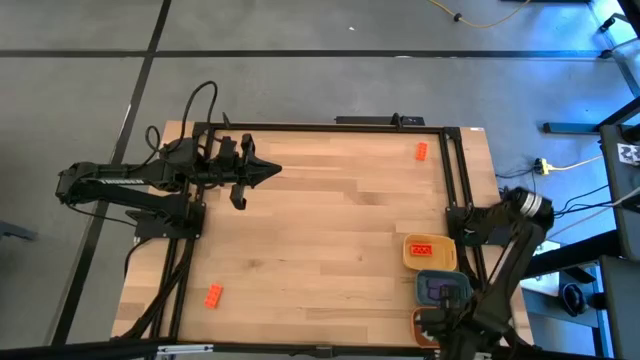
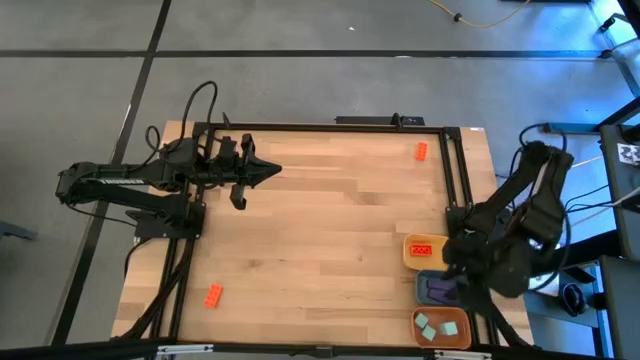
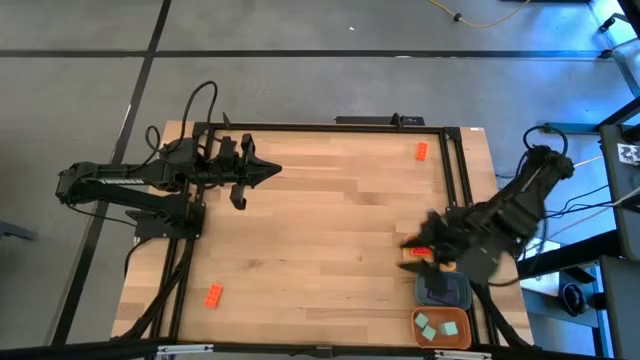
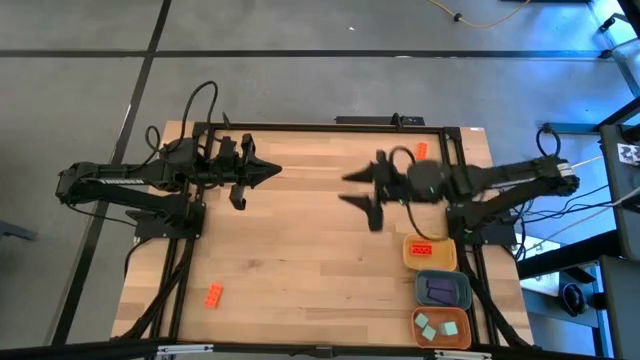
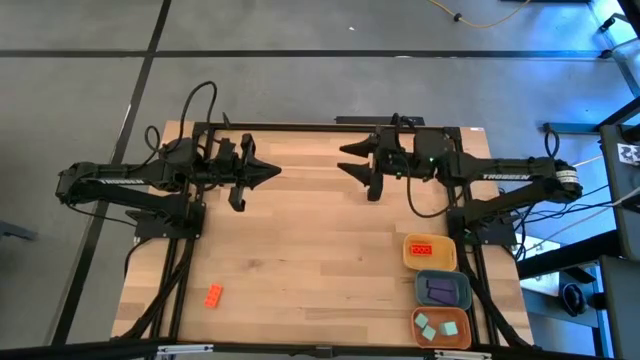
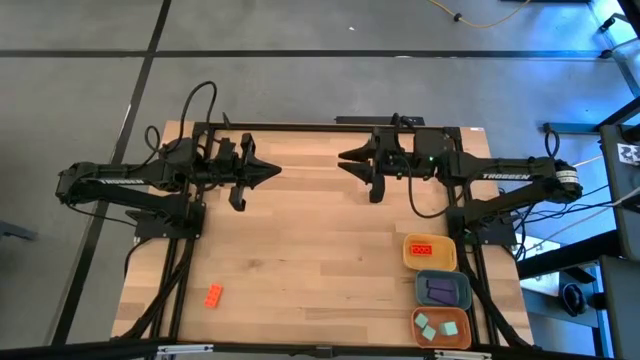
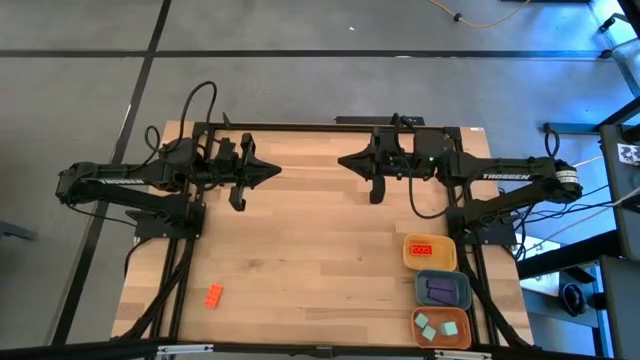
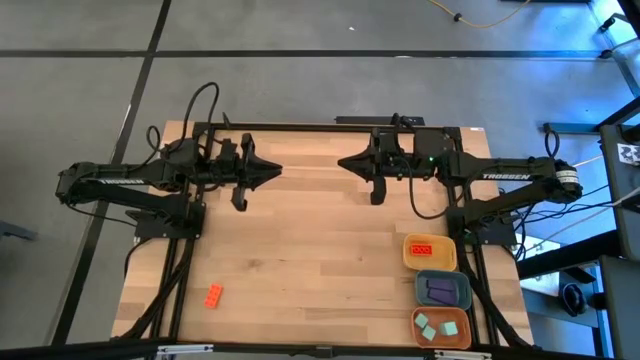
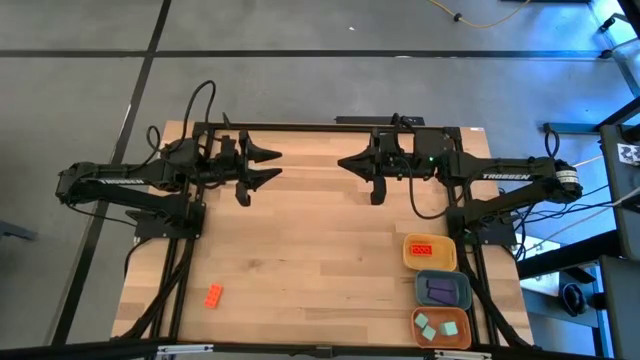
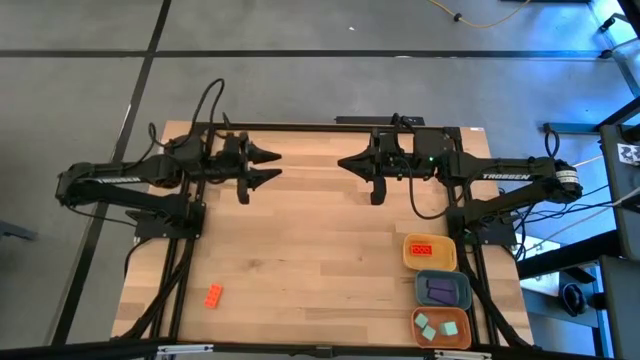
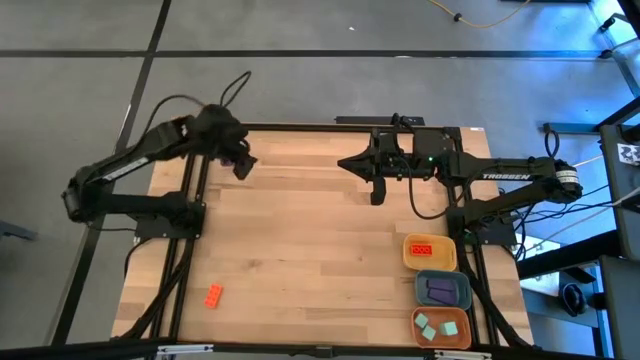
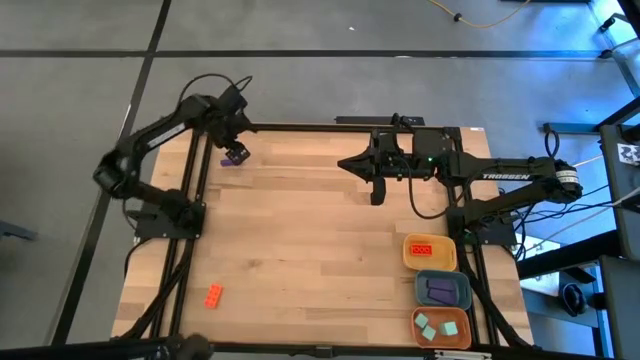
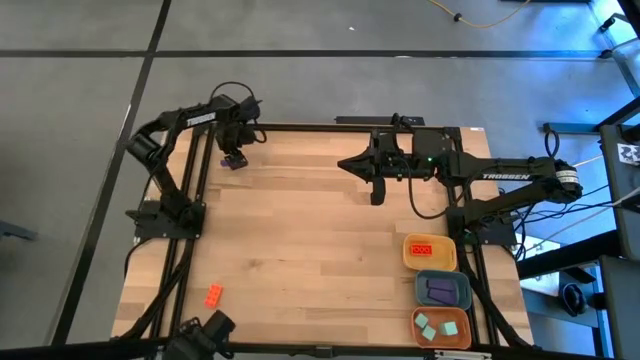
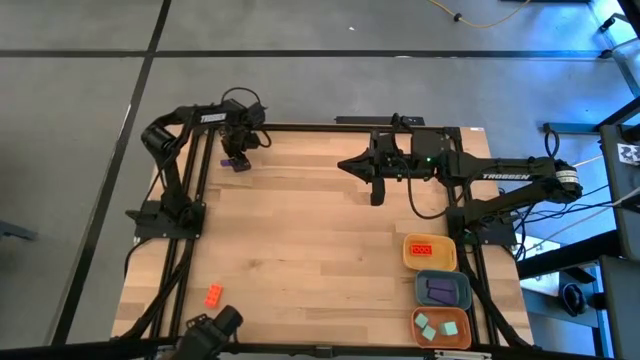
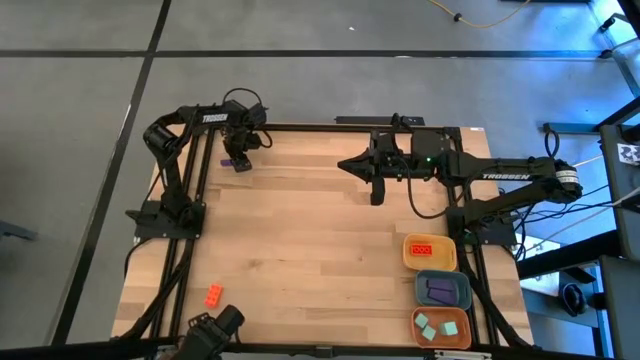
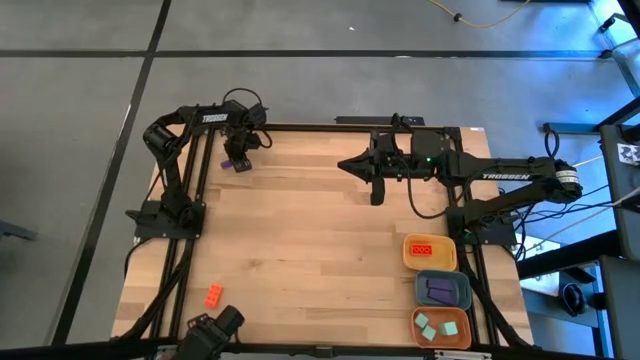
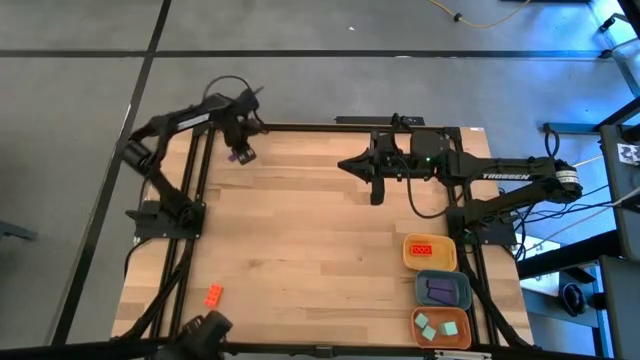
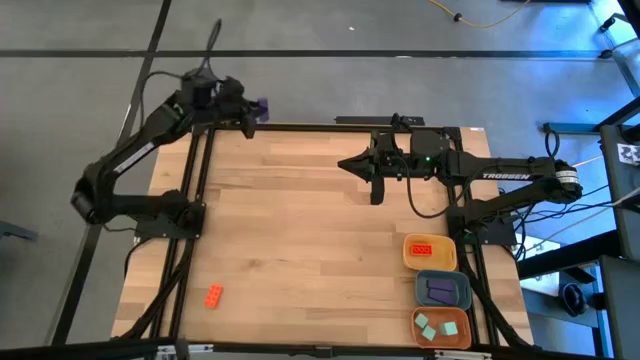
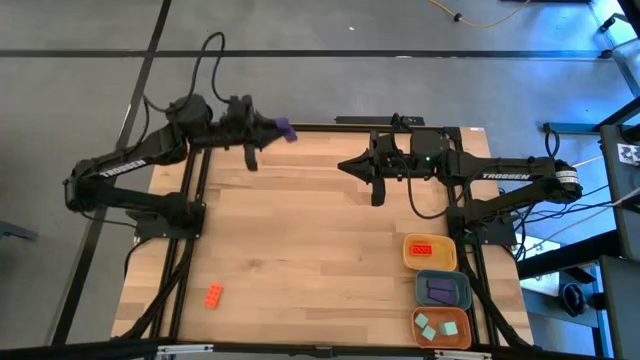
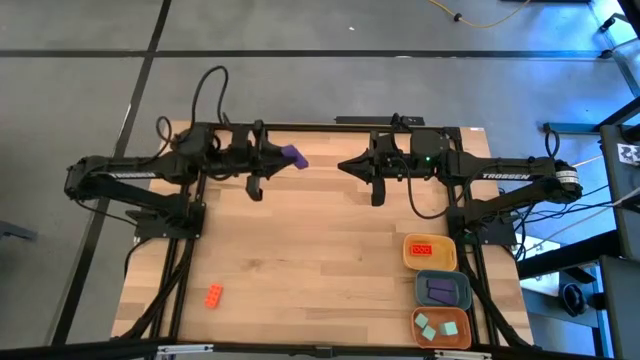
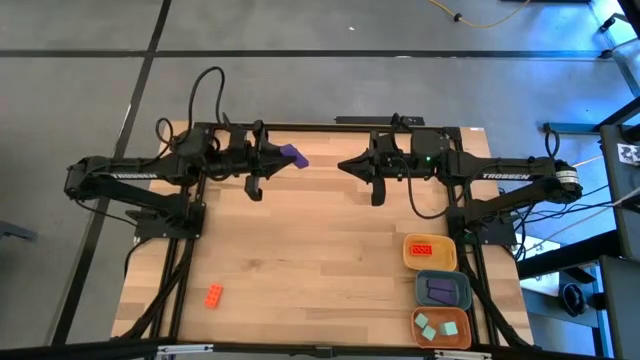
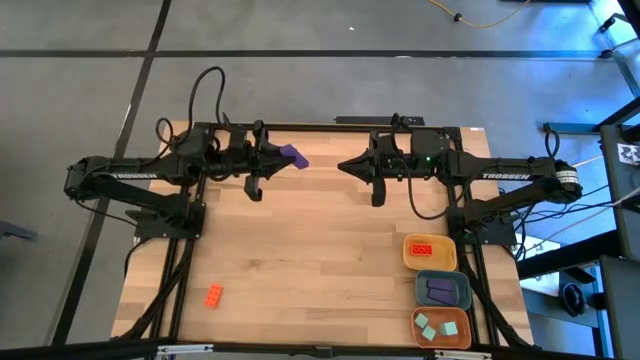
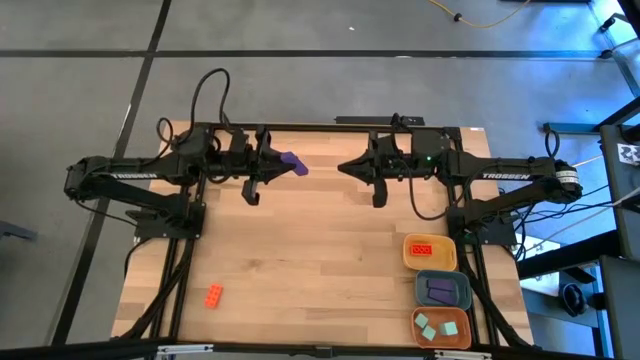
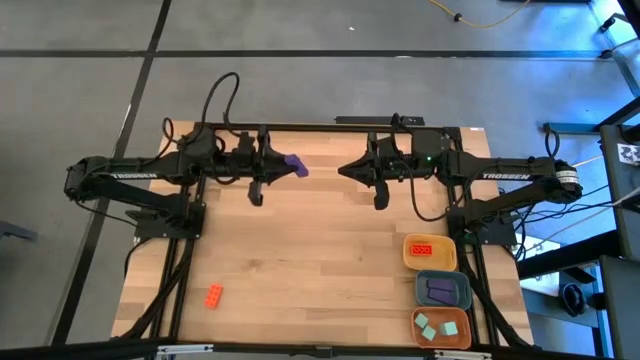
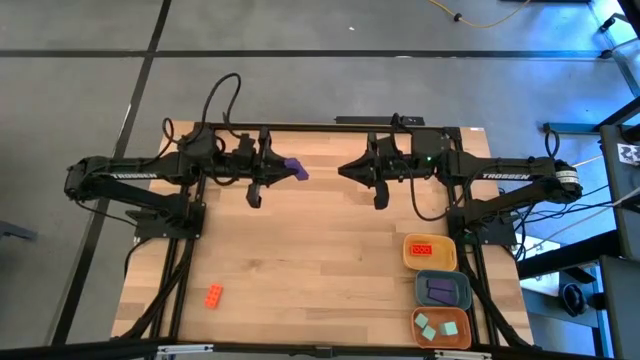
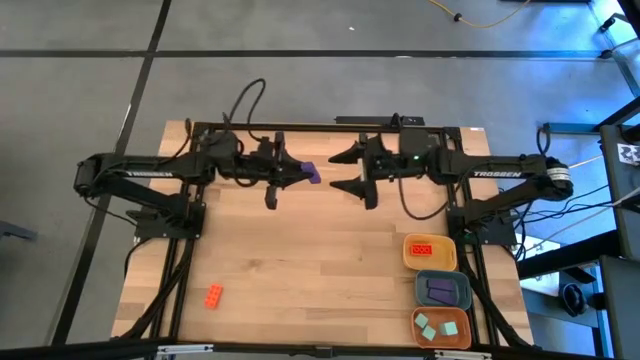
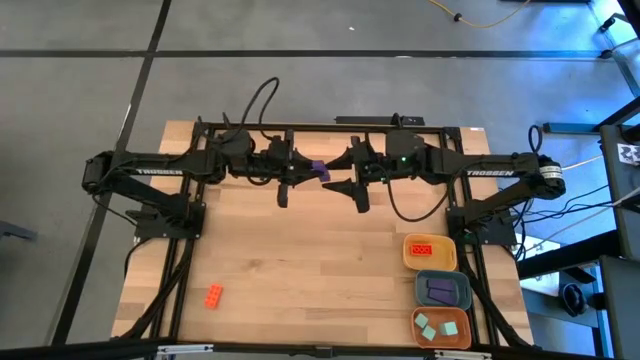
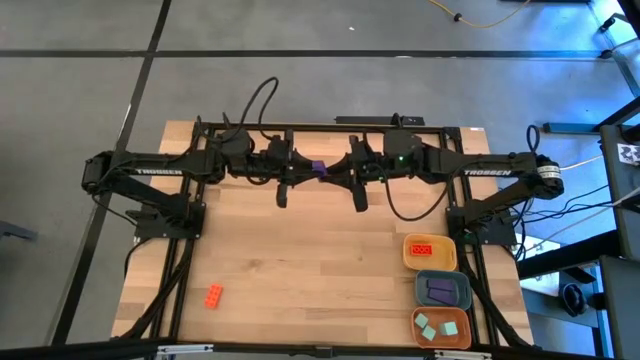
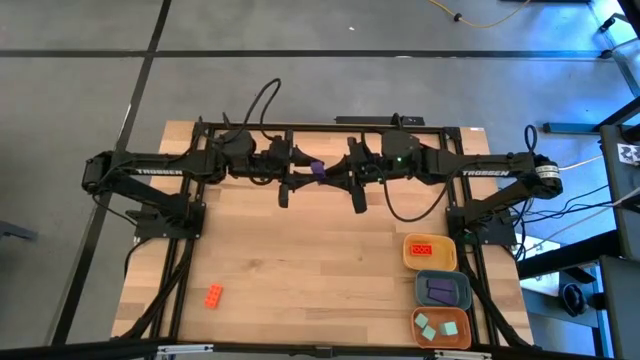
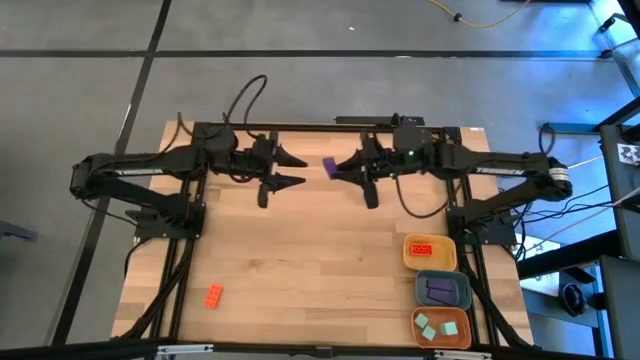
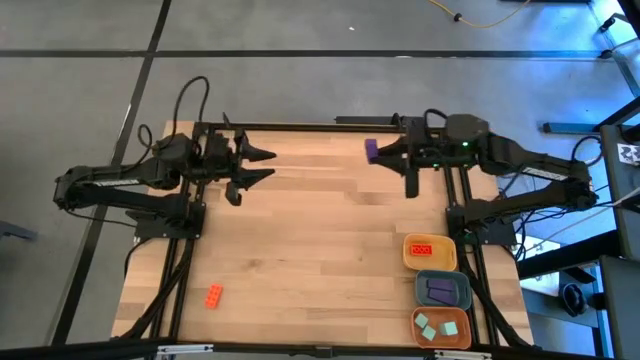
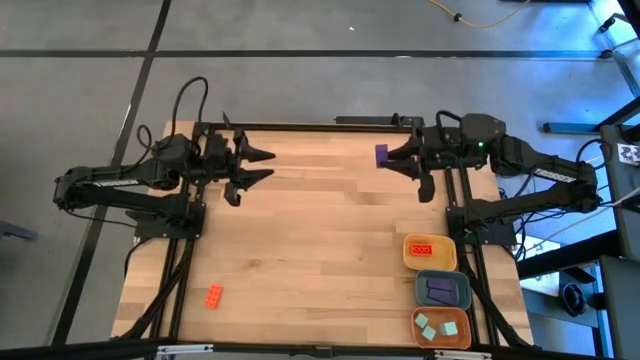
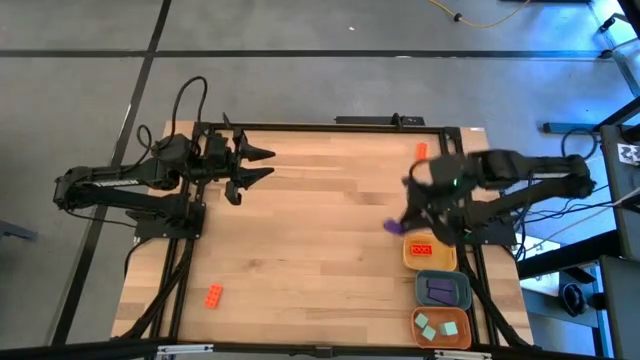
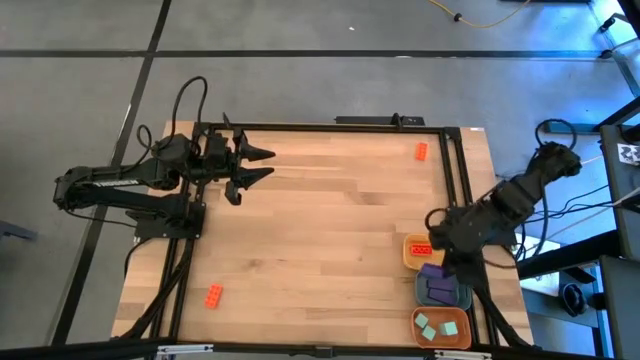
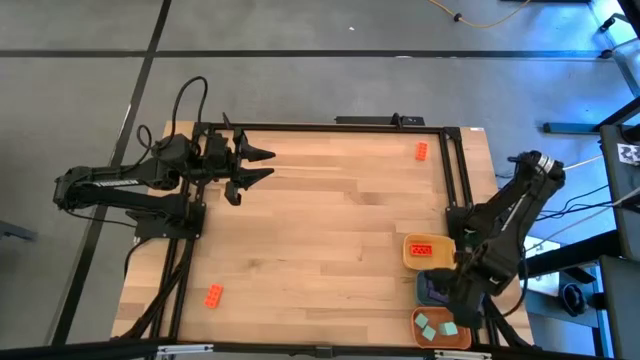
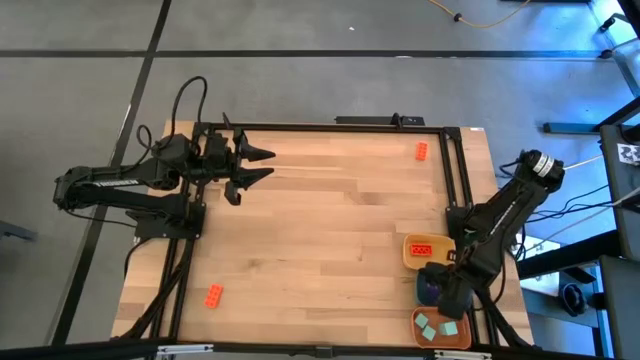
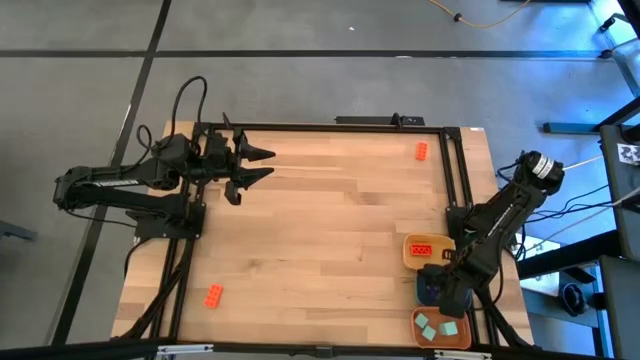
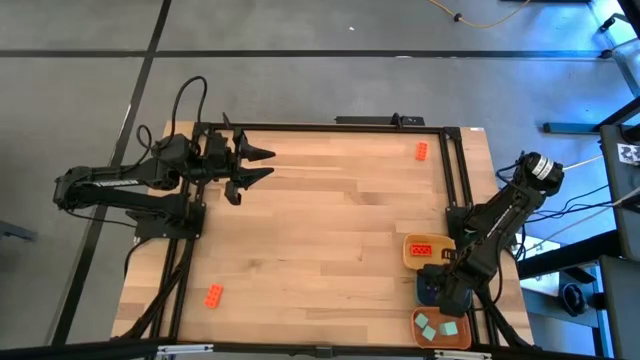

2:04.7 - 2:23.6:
Task: Sort & place blocks by color
Put the violet block into the blue bin

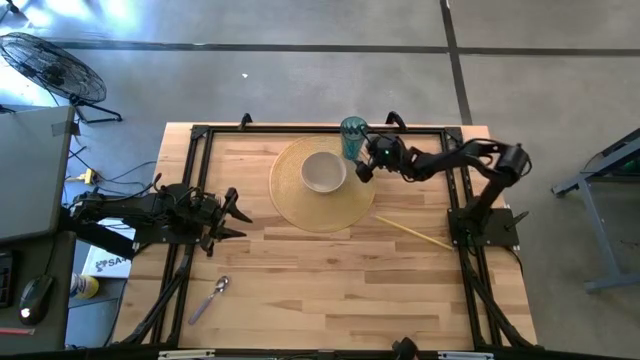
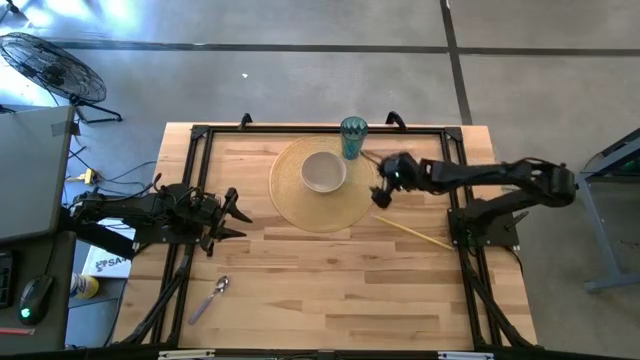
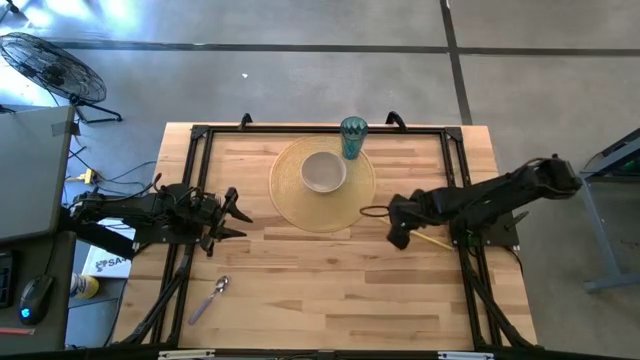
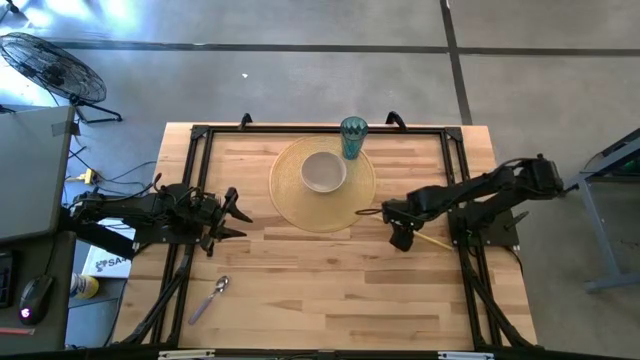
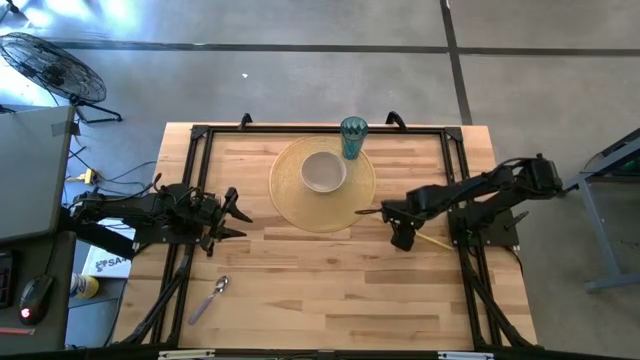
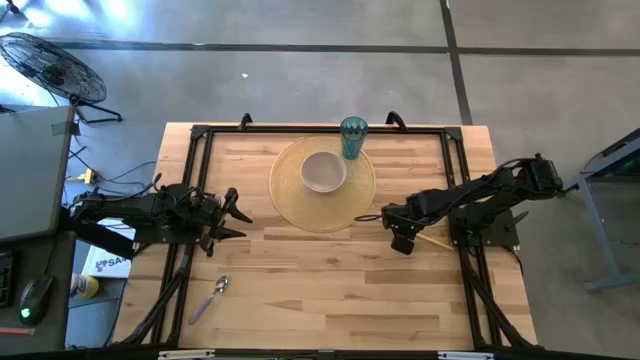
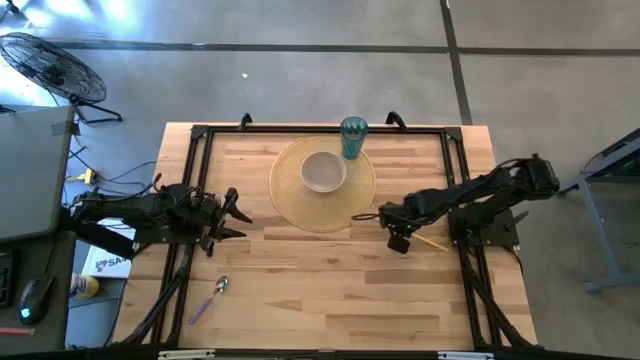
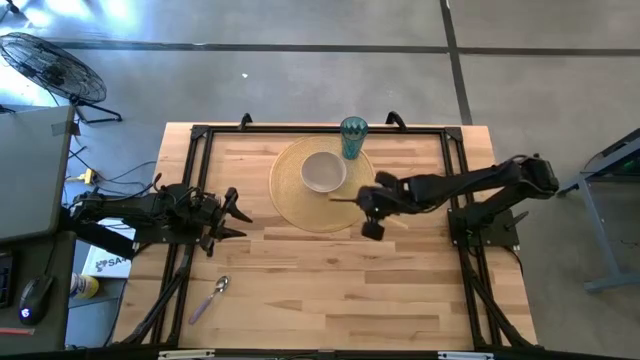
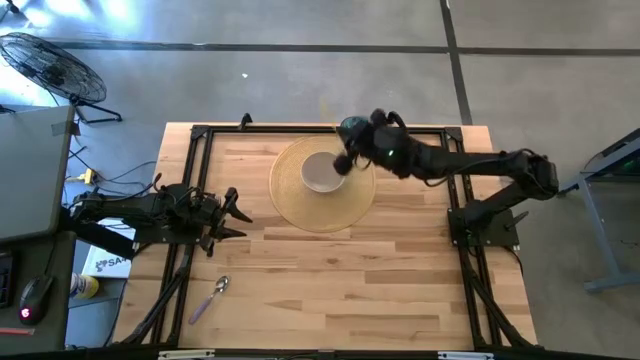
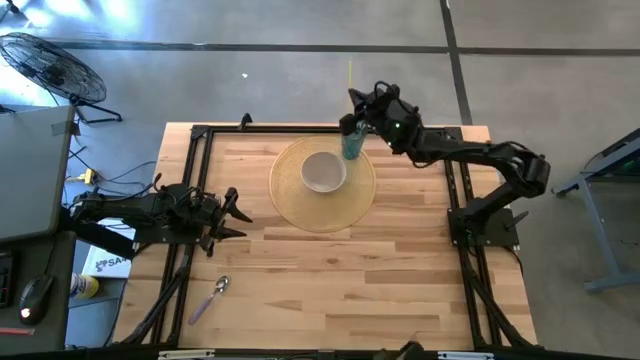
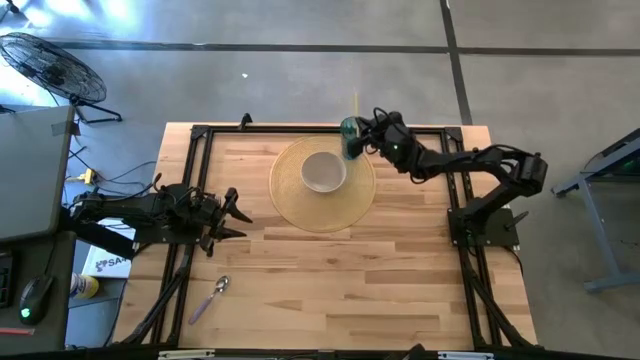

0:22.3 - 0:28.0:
Task: Pick & Place Utensil
Put the yellow straw into the blue cup on the brown mat
